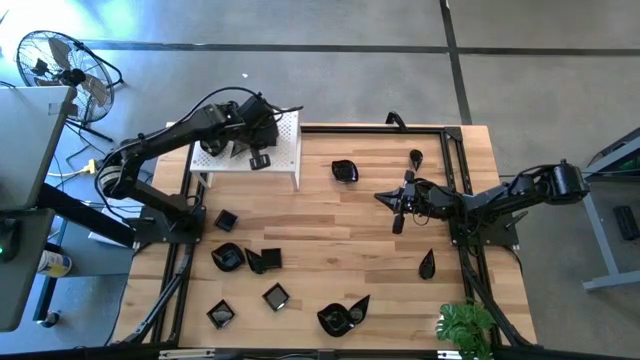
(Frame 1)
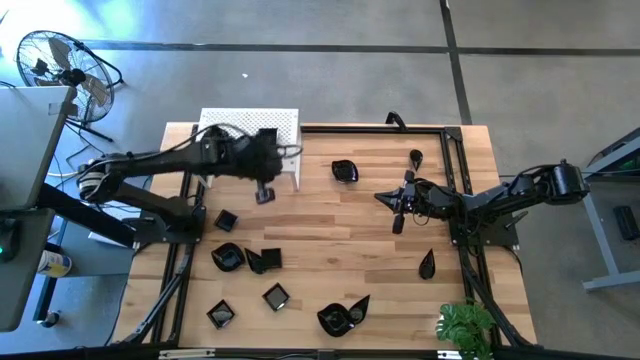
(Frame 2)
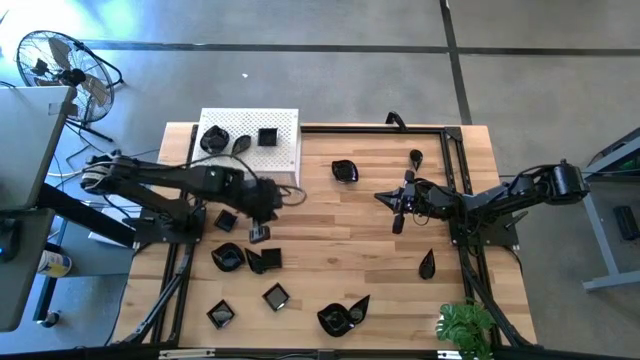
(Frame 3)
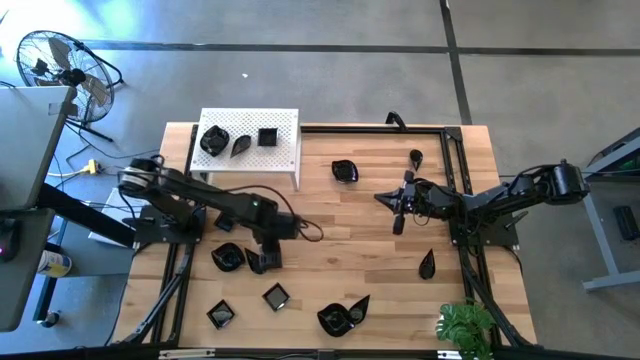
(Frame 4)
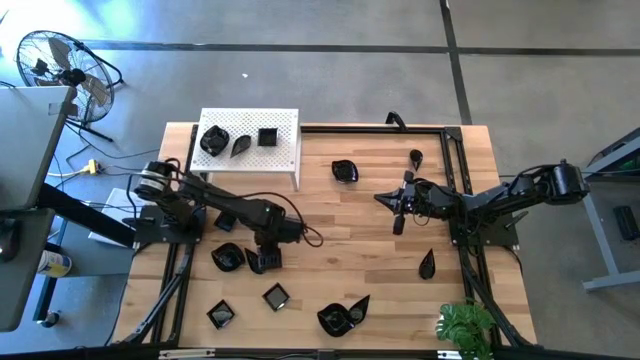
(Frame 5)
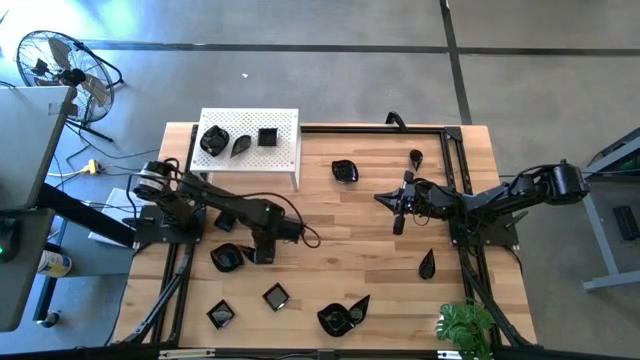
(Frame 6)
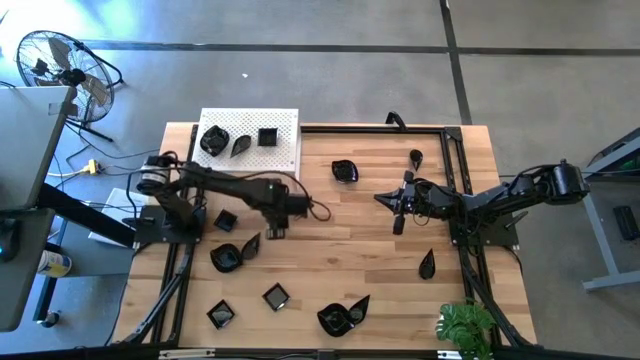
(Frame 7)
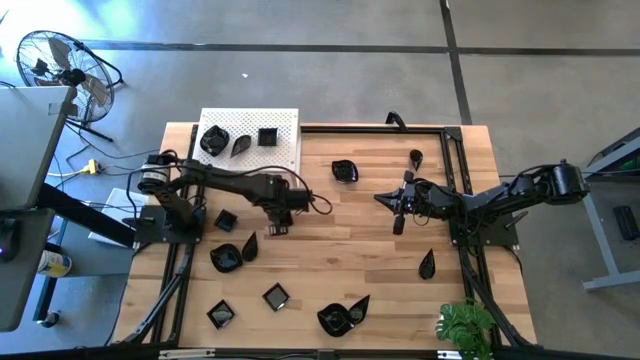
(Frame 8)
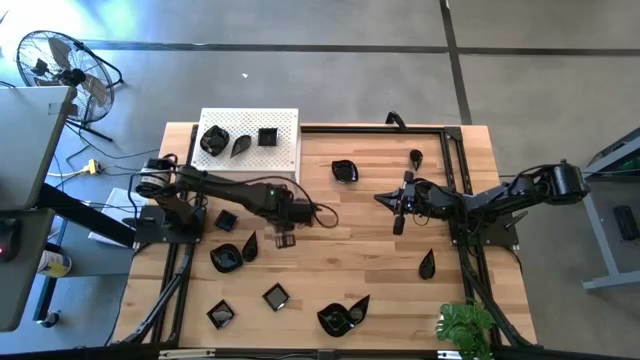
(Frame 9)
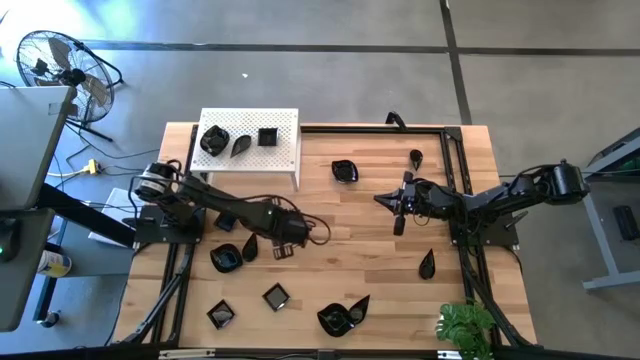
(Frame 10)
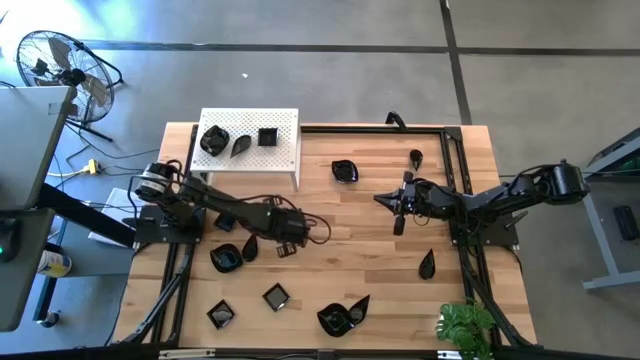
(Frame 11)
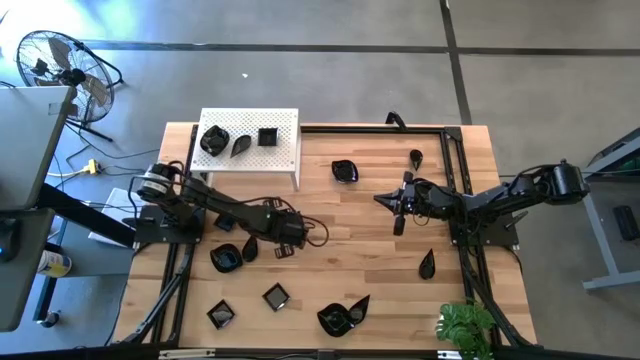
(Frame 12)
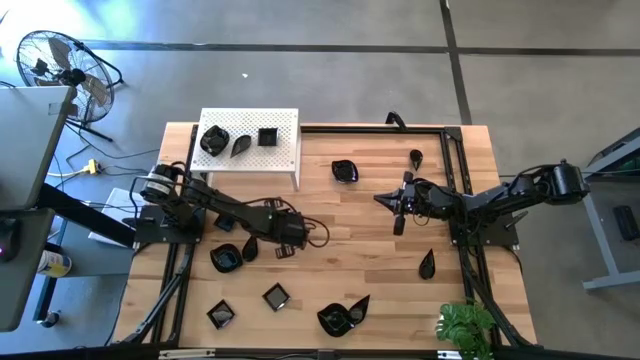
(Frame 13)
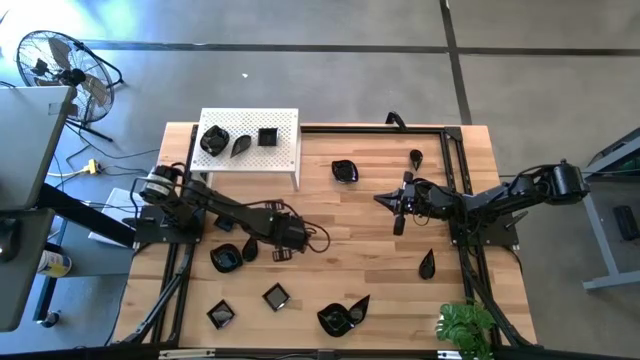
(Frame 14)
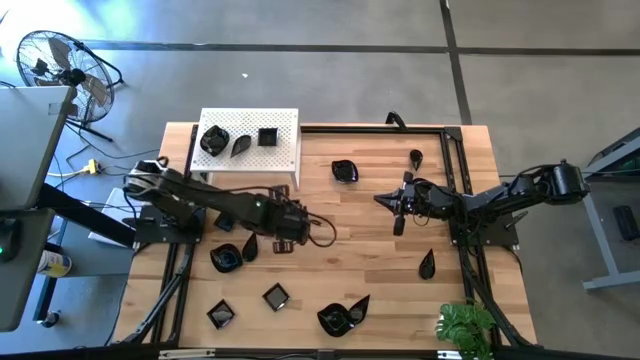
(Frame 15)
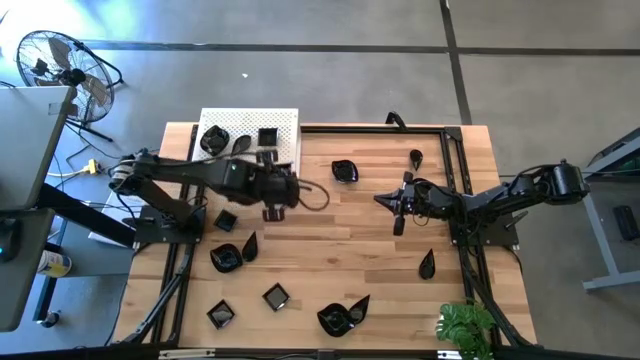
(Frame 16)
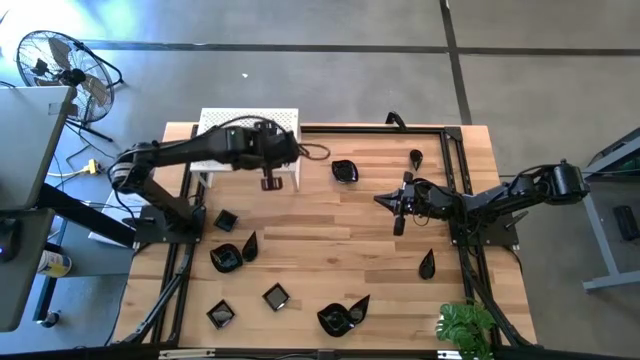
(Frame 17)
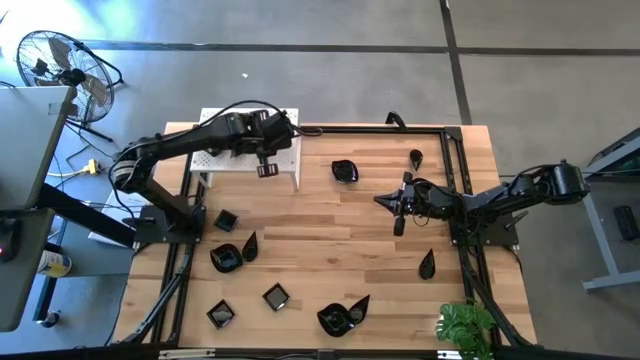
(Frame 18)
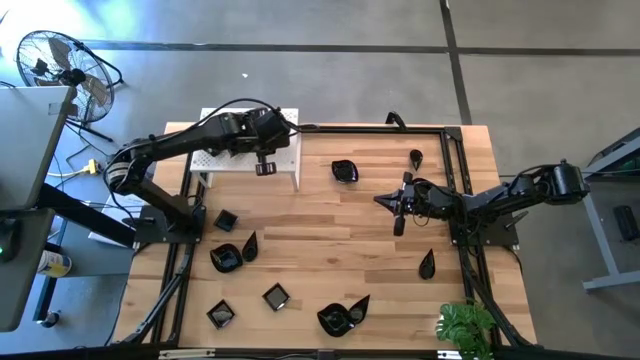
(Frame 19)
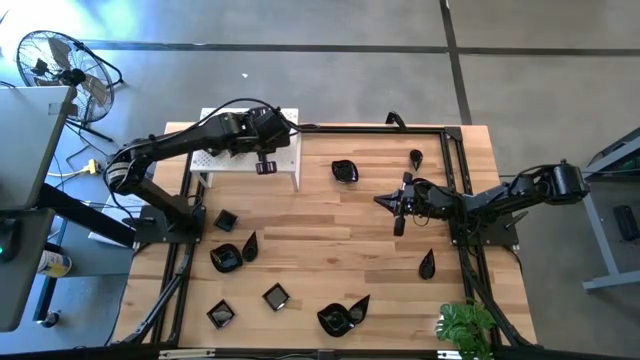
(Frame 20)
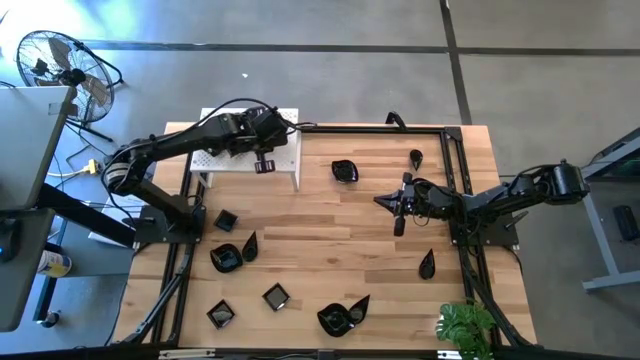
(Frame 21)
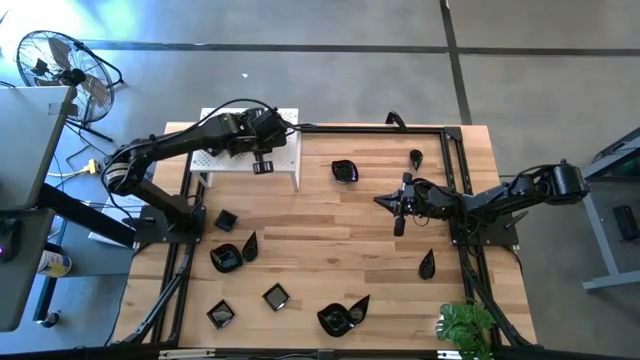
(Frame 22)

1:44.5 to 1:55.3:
Task: Pick & Place Mini shaped plates
Stack the black square plate on the top of the stacked black square plates on the shelf

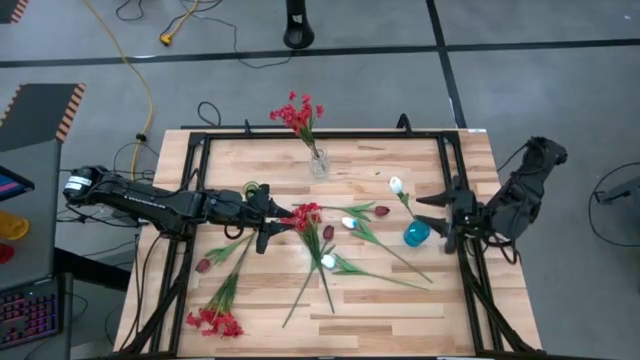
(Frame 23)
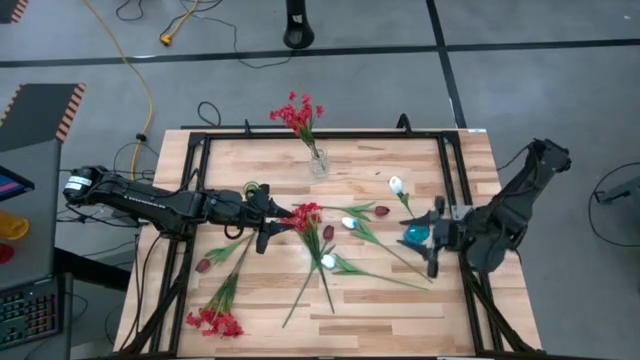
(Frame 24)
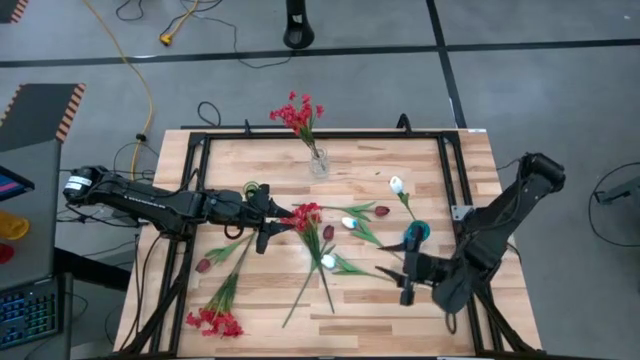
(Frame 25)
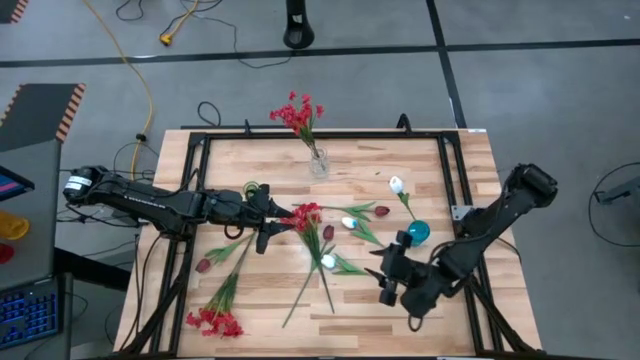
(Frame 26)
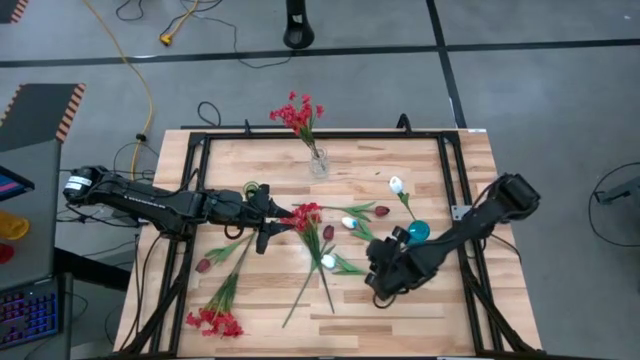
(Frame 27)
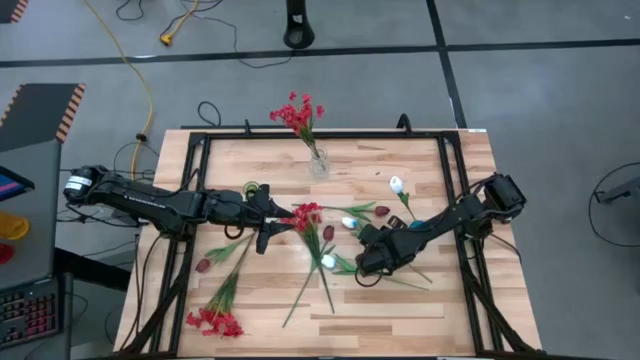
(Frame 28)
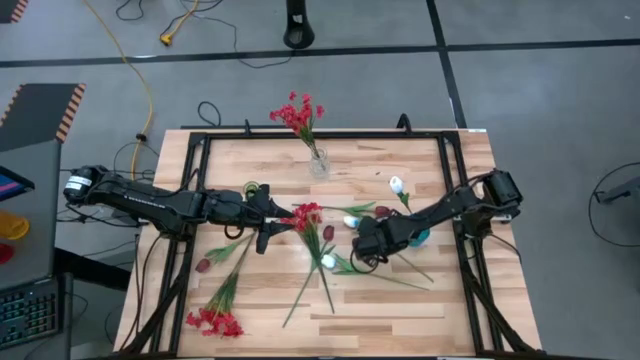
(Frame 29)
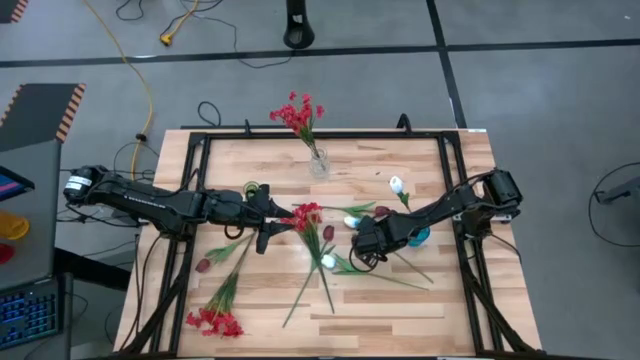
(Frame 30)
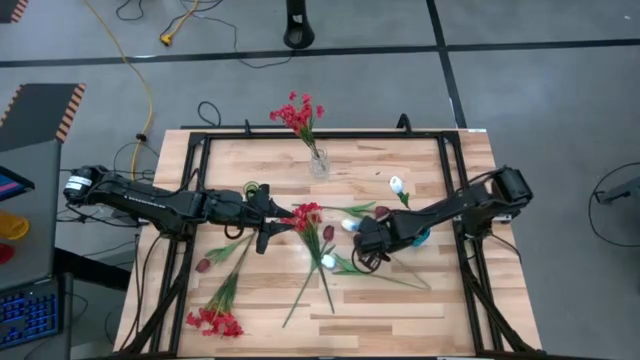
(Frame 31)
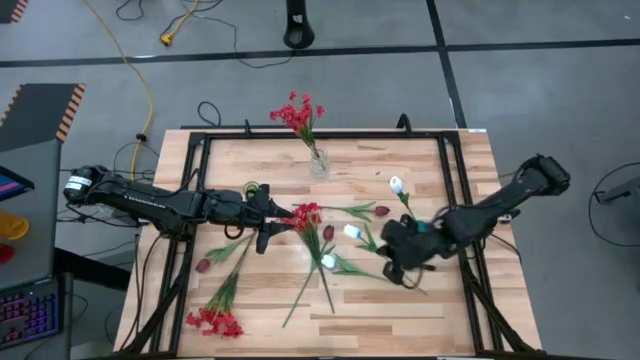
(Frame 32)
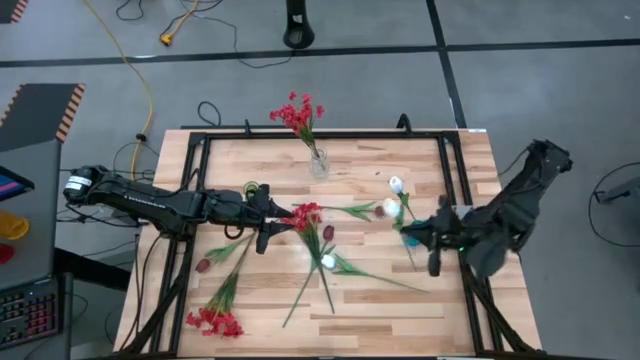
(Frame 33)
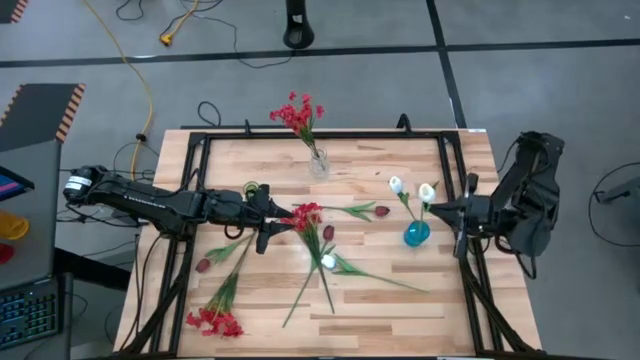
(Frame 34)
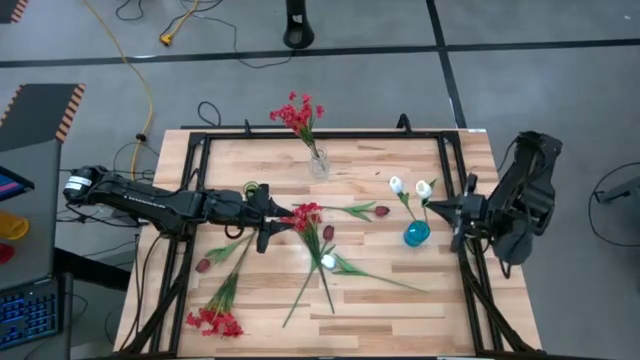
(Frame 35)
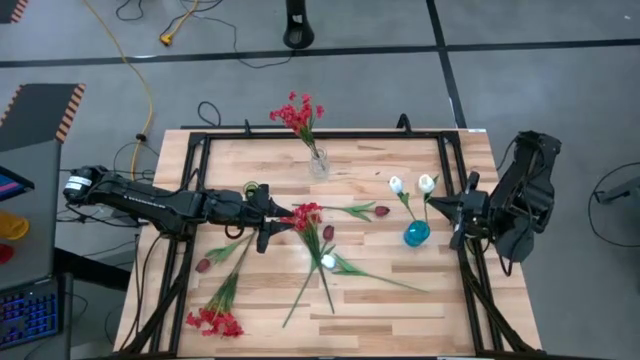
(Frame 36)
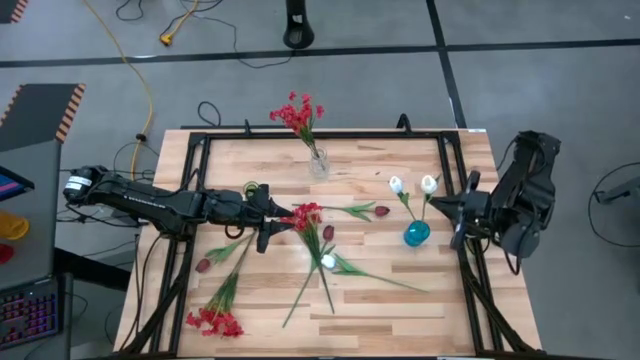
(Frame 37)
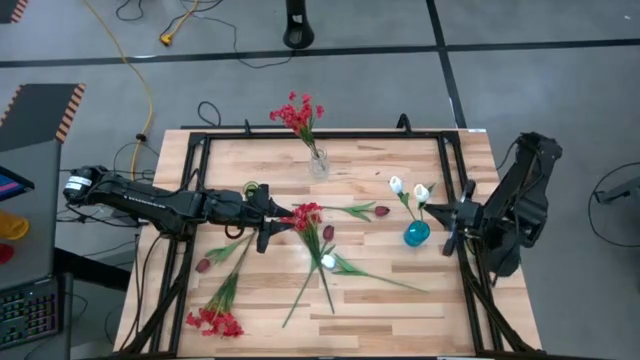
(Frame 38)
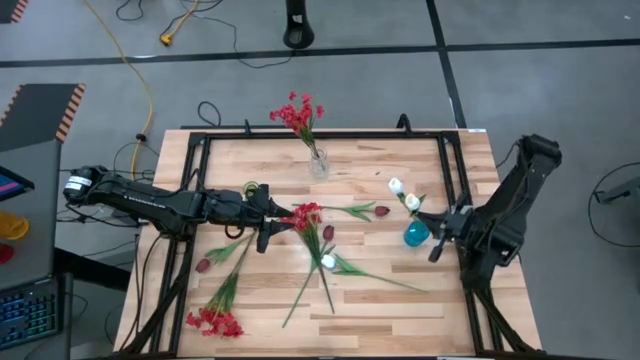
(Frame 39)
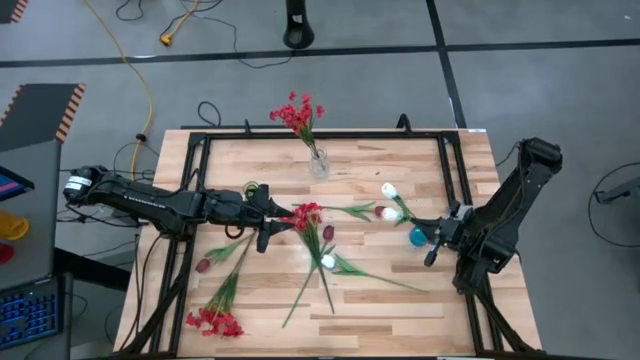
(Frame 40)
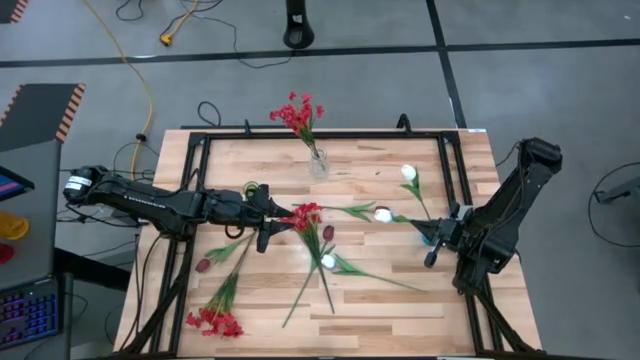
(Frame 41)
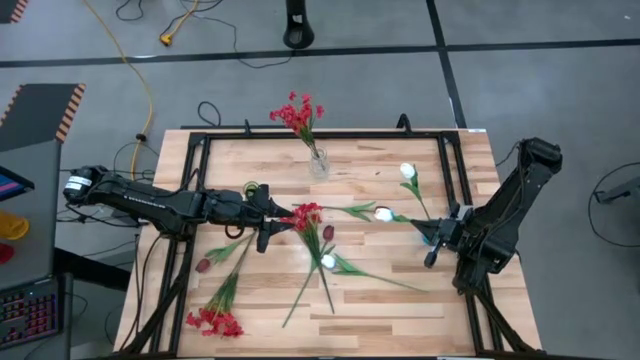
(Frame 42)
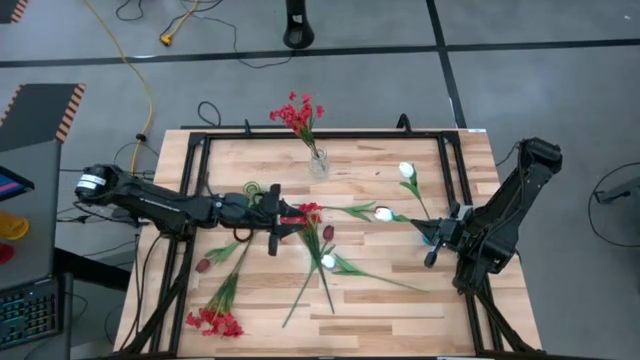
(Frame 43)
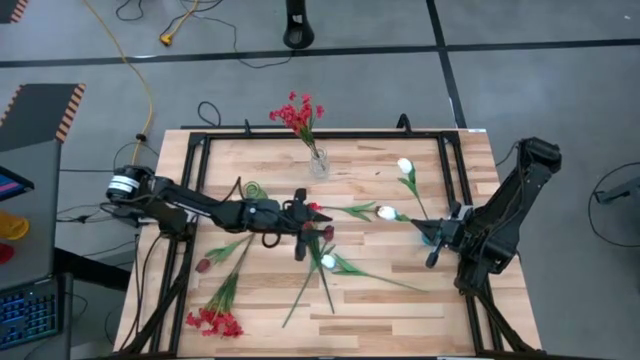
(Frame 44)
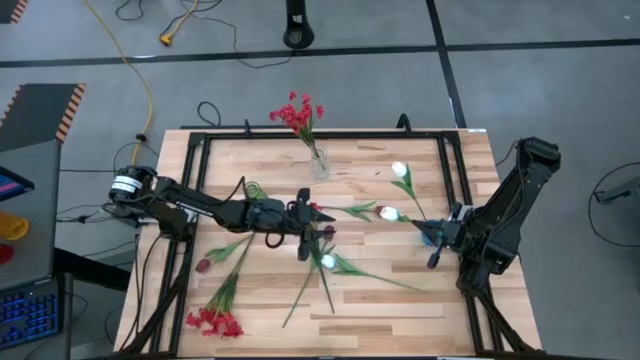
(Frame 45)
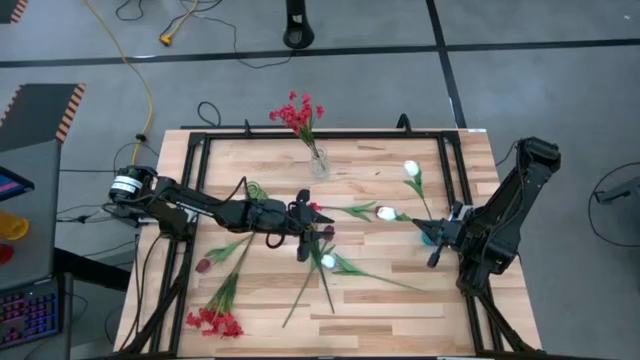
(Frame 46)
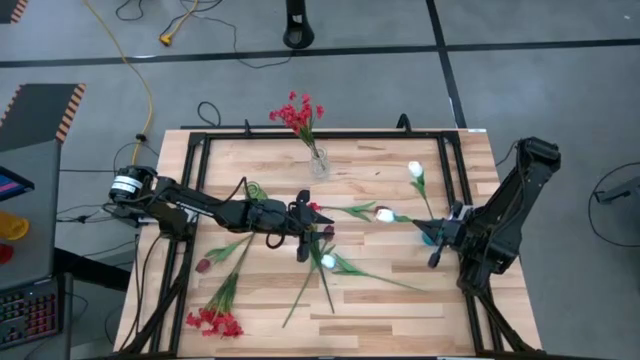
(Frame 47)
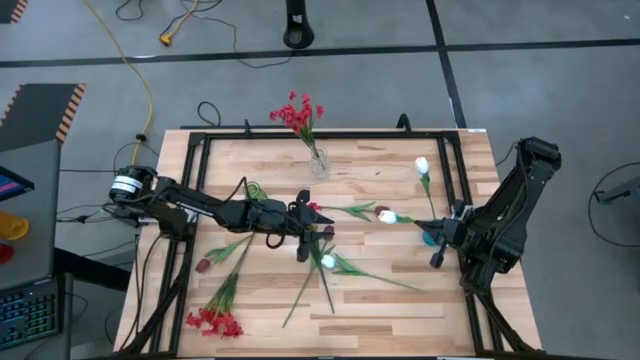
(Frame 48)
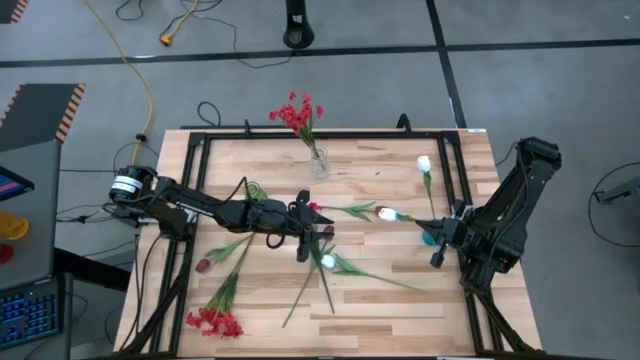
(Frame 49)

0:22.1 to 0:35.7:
Task: Sort flowers into vase by color
Put the top white tulip into the blue vase
